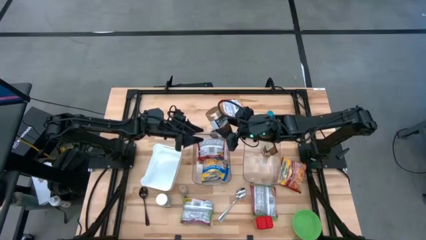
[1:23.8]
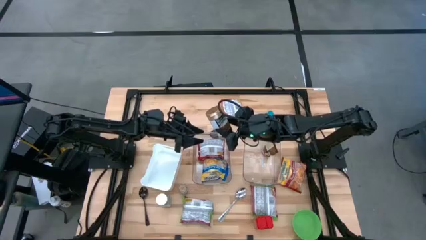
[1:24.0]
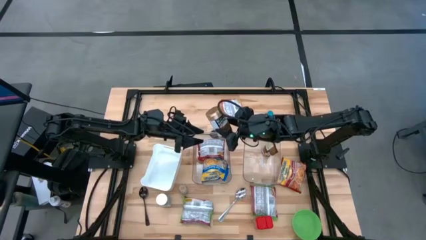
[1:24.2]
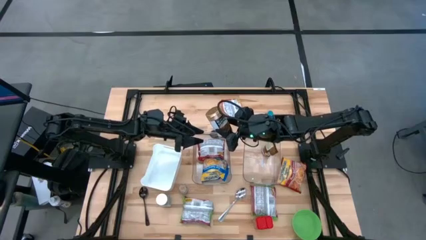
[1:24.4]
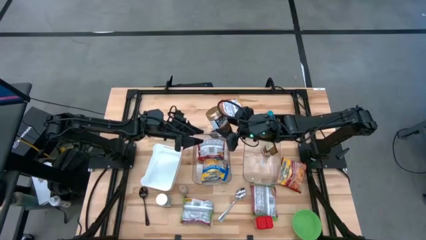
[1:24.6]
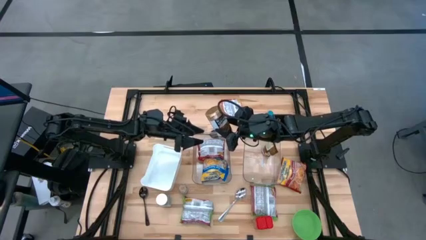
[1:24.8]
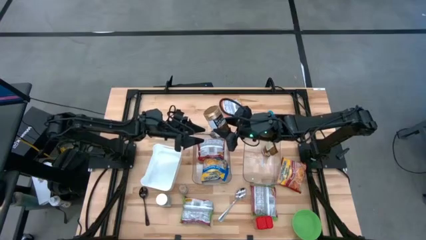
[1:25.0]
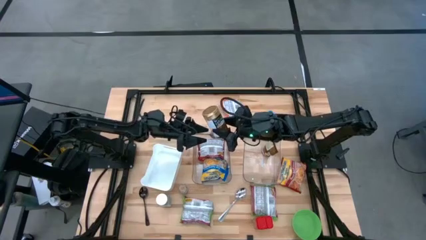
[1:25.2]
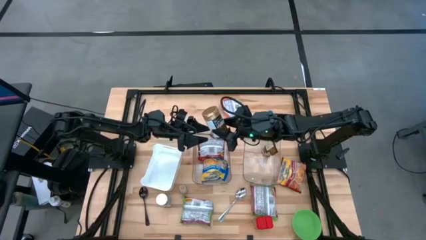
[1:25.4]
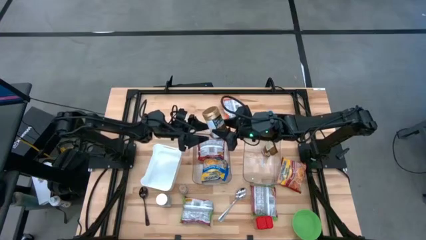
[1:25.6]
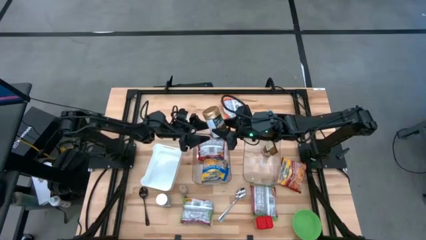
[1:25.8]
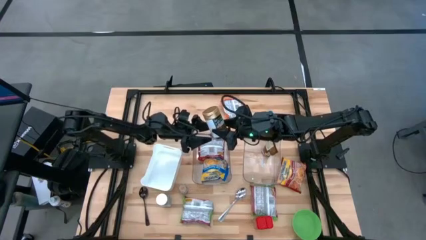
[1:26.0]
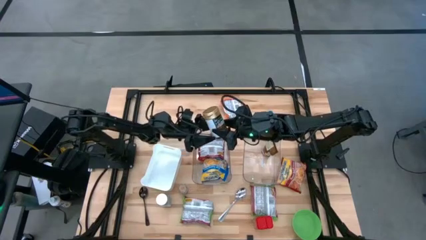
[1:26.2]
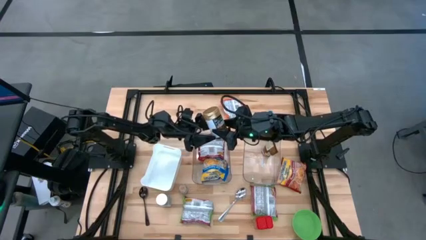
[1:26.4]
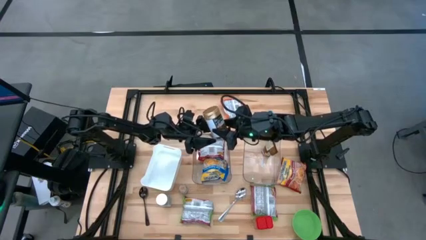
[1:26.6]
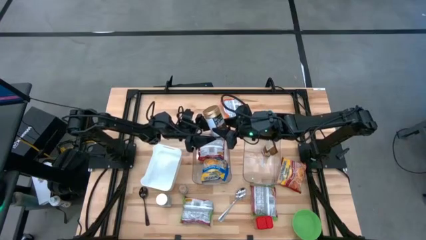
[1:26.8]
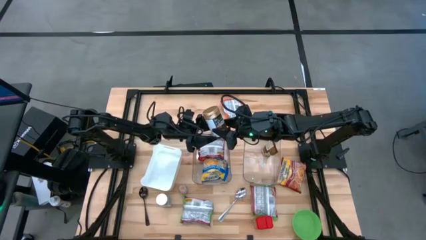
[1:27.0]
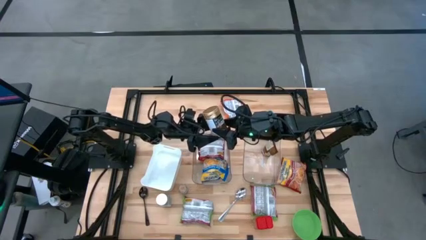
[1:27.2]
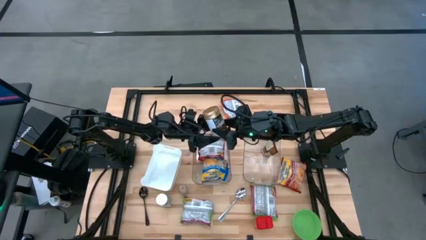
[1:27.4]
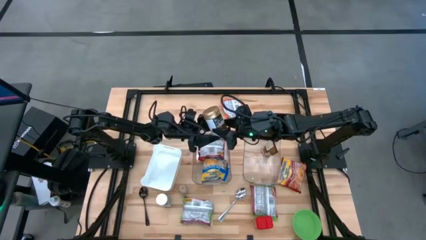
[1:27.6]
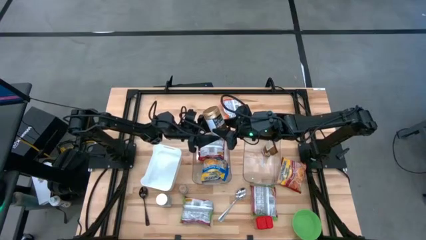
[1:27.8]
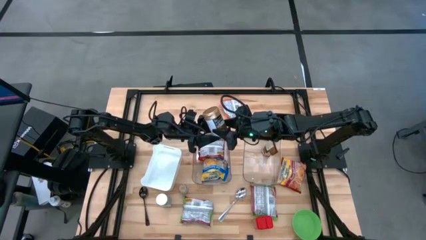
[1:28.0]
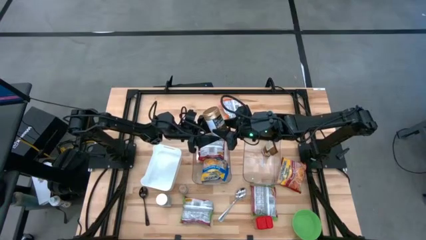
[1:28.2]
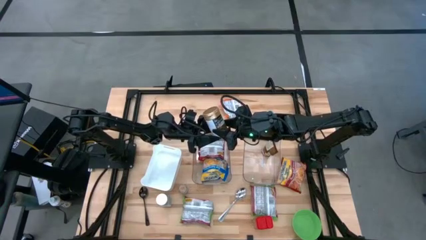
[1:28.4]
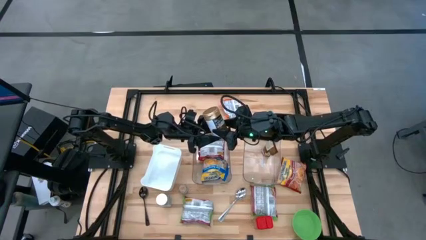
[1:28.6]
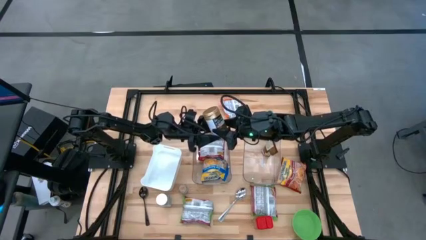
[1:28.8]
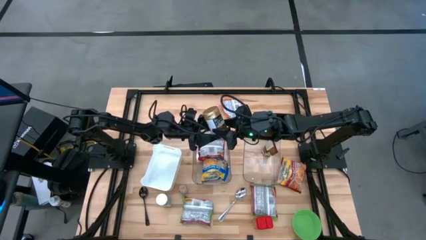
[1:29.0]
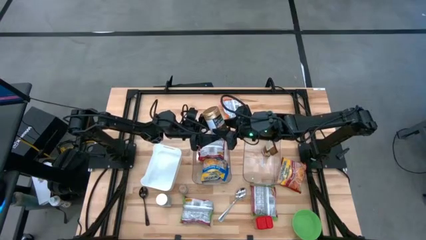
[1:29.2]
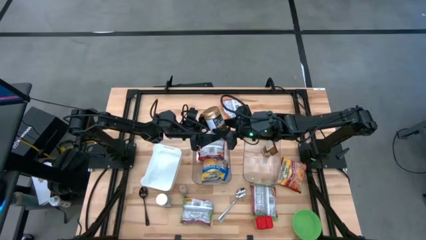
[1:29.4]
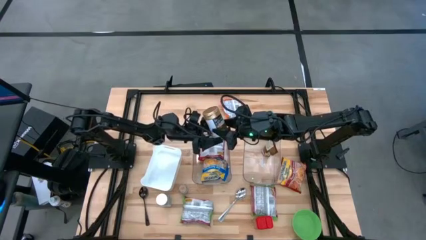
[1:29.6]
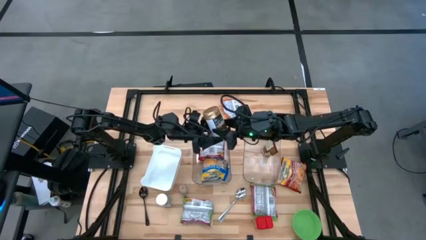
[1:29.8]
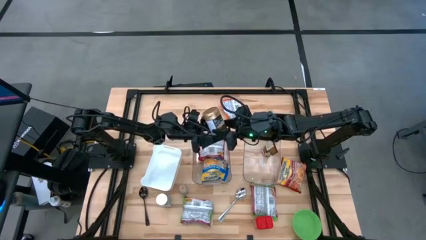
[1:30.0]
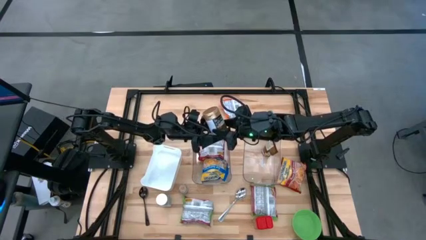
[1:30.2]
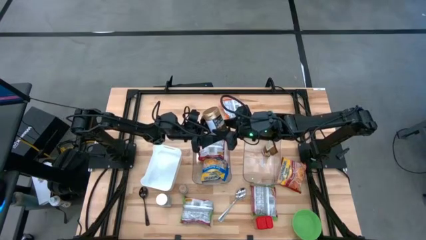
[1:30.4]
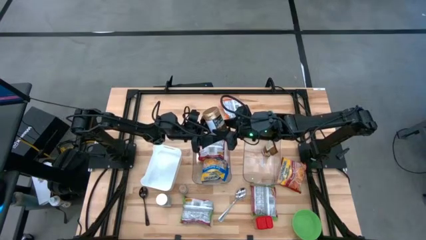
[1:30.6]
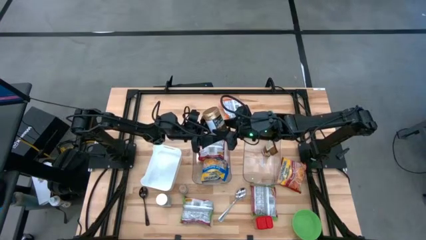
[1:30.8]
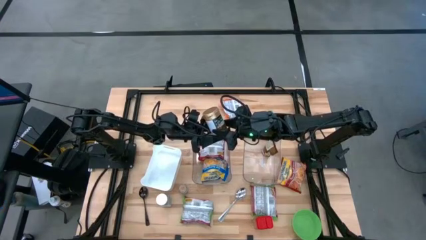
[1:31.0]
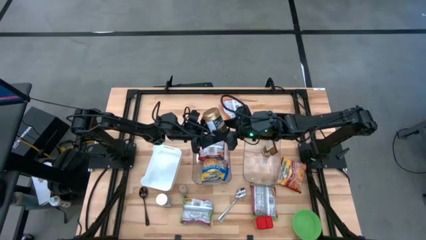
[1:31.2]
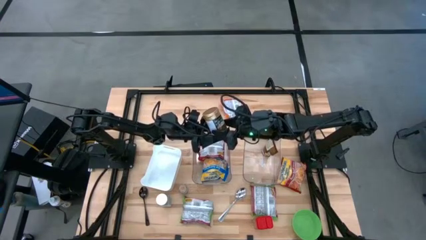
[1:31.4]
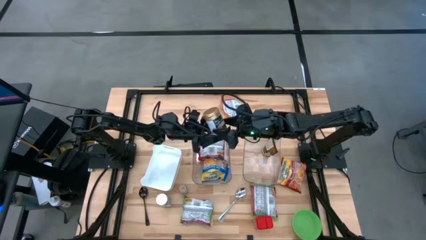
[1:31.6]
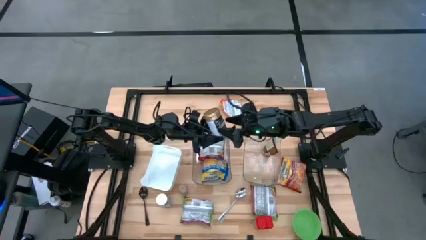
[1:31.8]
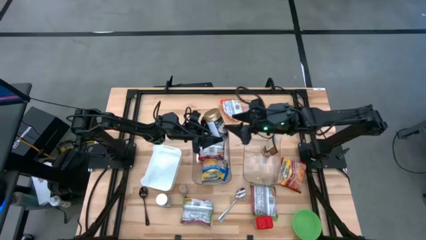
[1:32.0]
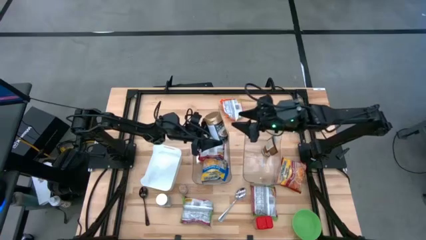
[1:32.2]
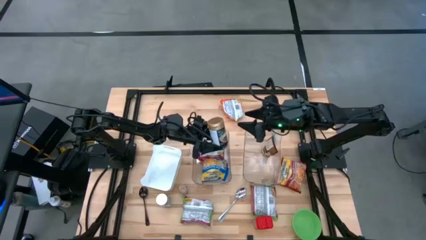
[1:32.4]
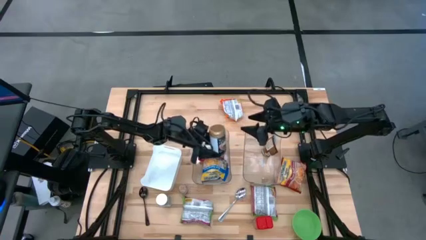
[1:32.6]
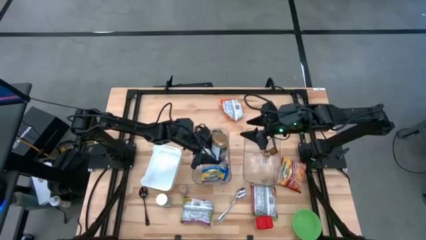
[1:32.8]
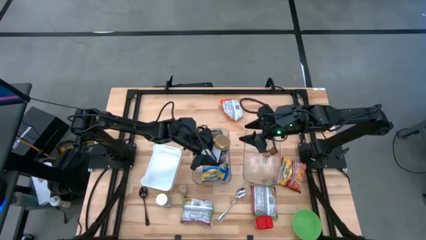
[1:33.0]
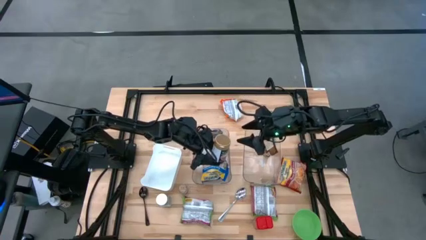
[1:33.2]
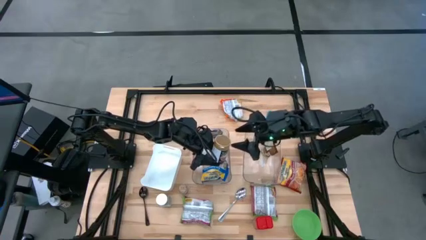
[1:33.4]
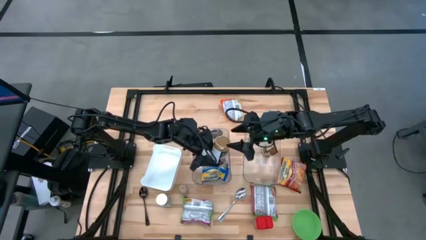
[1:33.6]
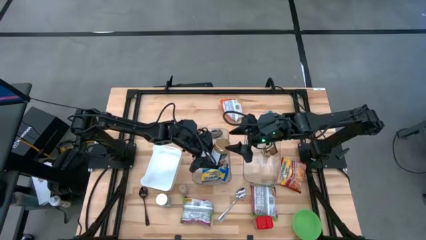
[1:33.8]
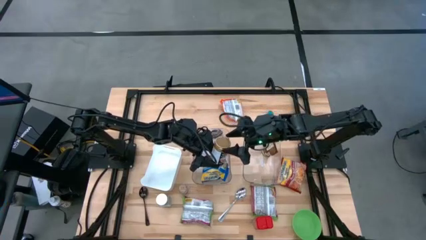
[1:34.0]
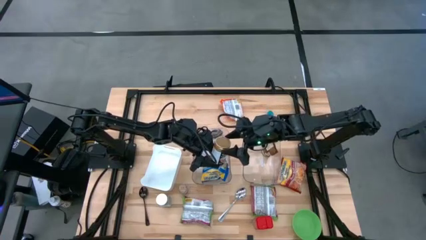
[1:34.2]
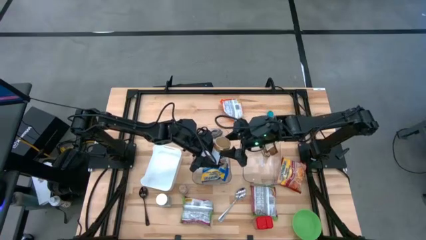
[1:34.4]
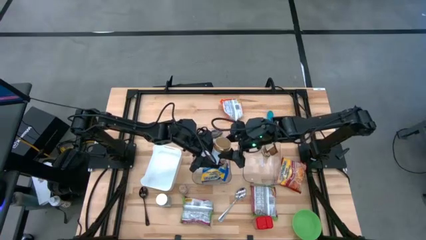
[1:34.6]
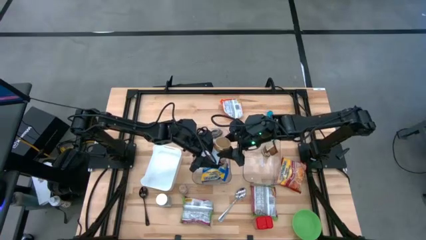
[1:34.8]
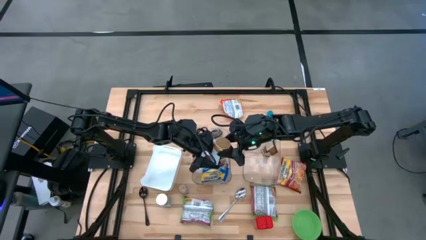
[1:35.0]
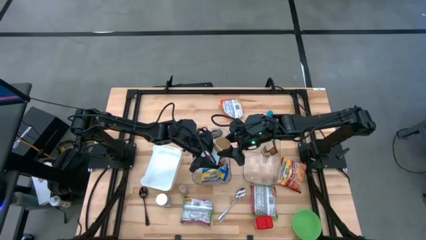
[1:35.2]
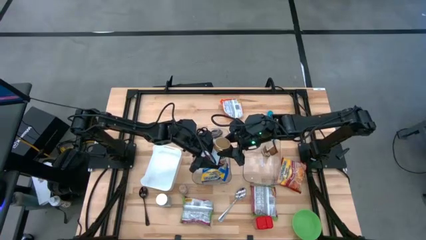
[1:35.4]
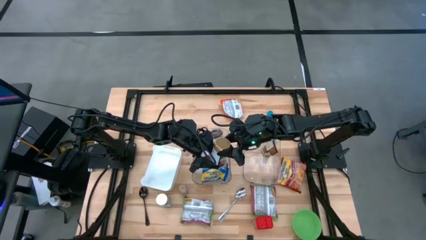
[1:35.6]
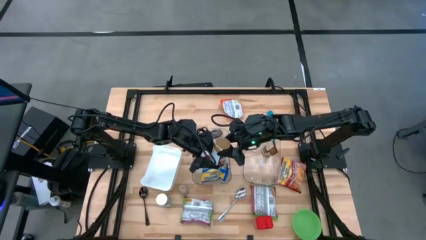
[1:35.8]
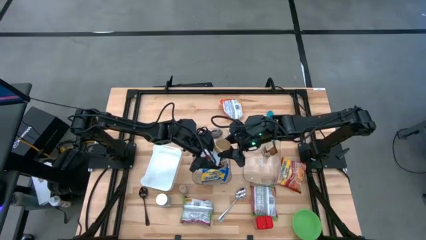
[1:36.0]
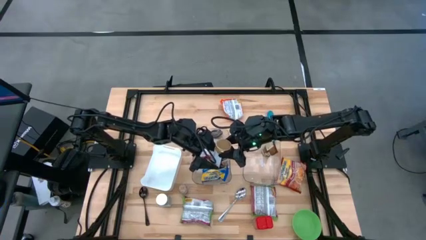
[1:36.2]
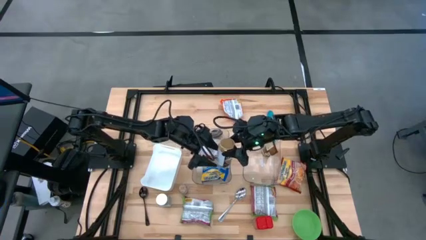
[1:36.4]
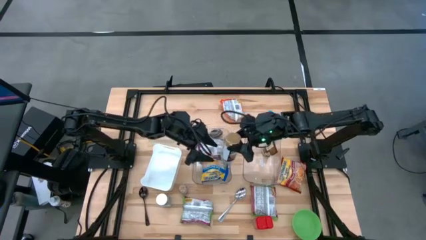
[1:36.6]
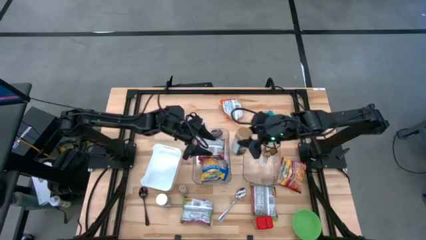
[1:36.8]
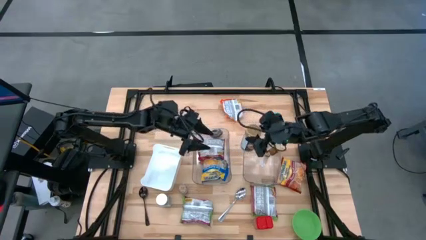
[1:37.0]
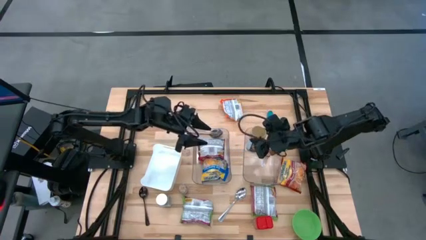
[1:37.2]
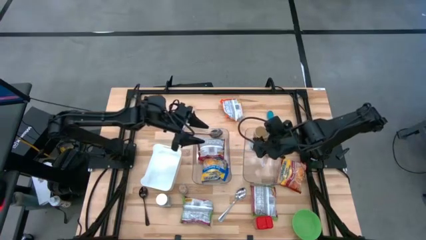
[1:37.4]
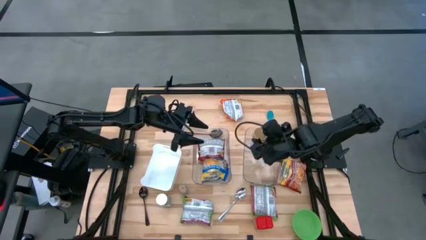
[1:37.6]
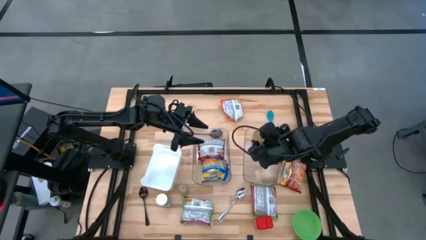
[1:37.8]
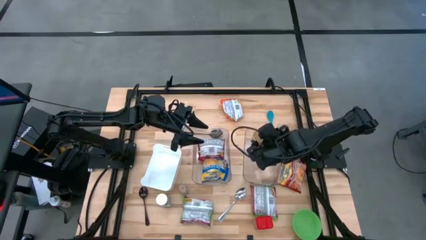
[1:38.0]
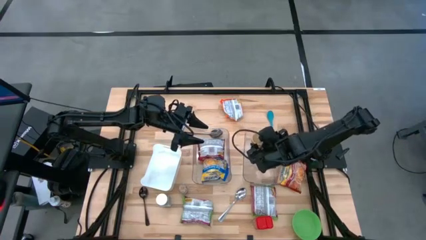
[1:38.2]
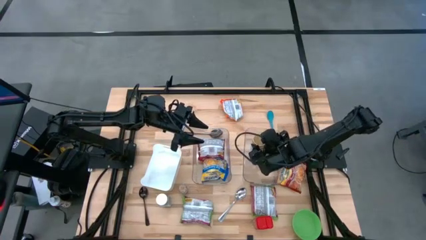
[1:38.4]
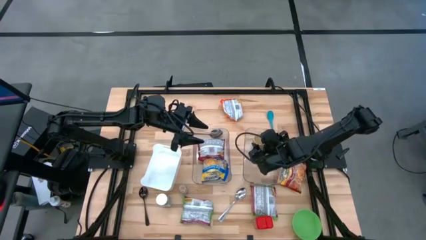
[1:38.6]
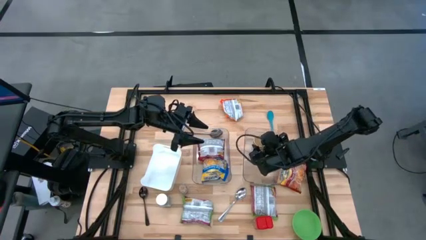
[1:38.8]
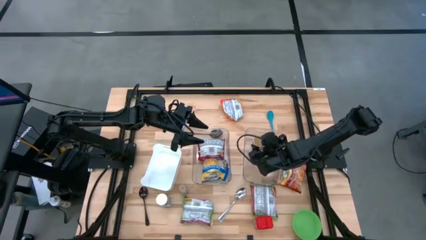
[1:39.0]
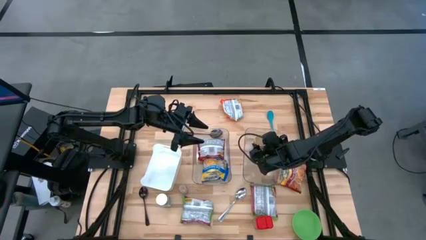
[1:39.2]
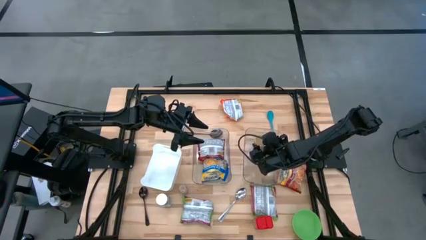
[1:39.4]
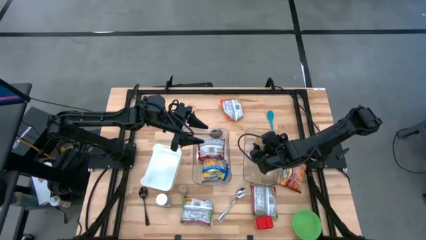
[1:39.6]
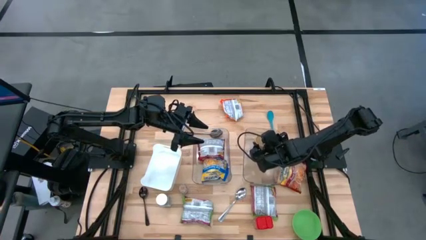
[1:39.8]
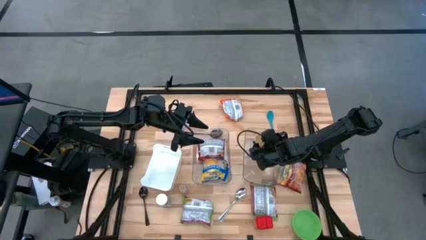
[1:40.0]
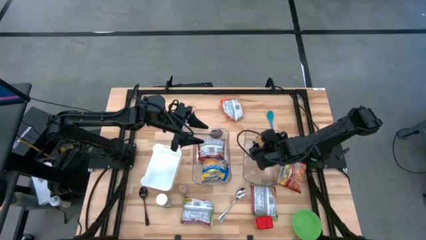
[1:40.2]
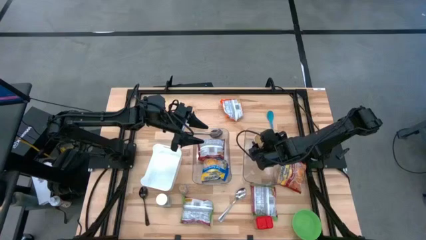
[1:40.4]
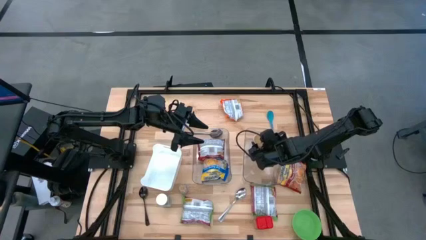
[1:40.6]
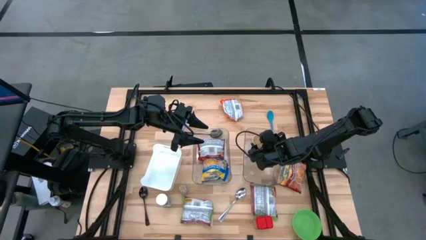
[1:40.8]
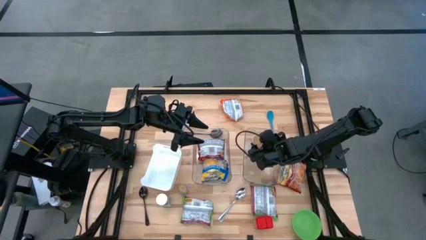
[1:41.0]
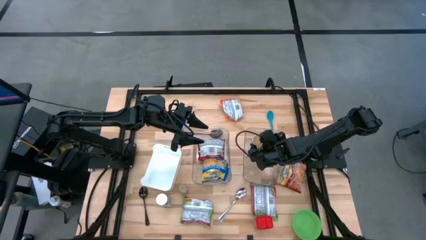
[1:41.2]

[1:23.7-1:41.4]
Task: Pick & Place Food Item
Put the gold spice bottle into the right transparent bin
